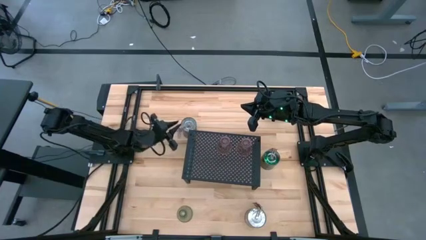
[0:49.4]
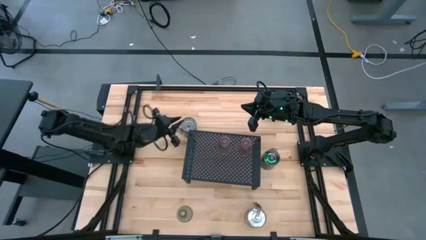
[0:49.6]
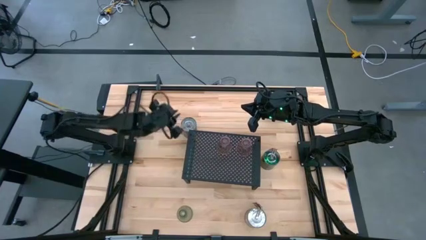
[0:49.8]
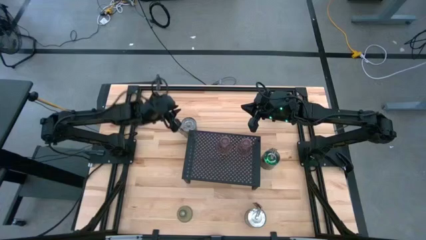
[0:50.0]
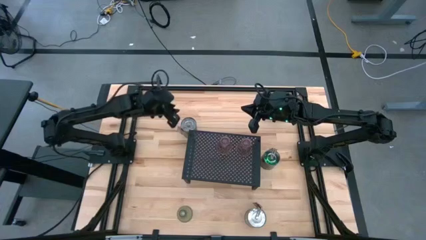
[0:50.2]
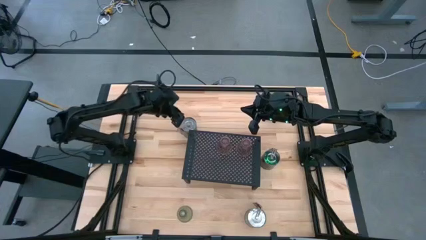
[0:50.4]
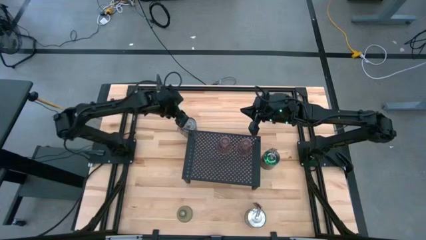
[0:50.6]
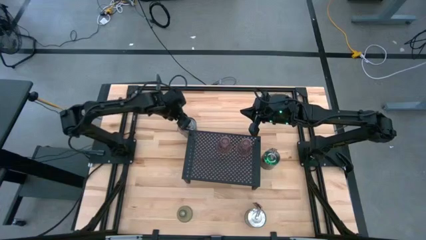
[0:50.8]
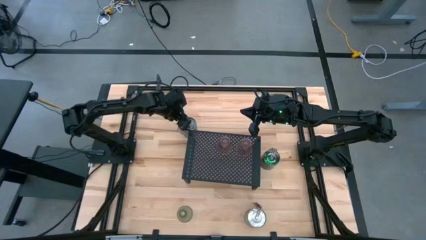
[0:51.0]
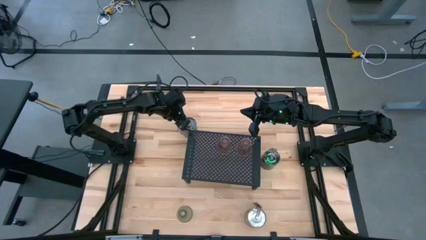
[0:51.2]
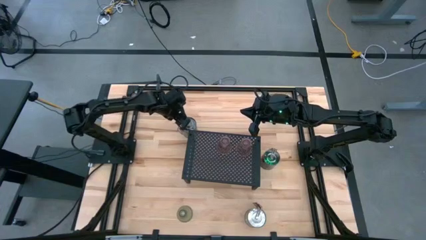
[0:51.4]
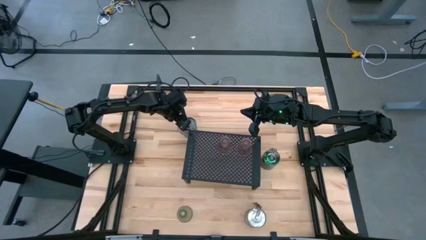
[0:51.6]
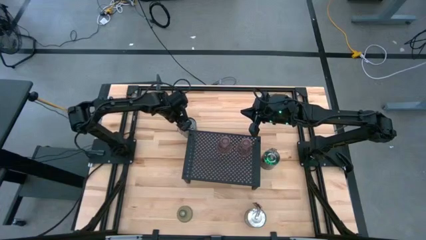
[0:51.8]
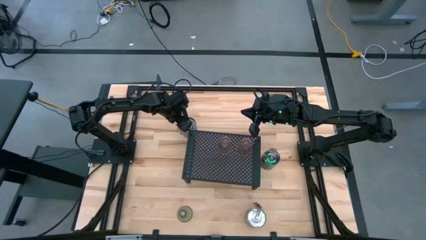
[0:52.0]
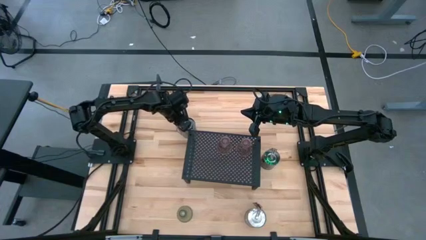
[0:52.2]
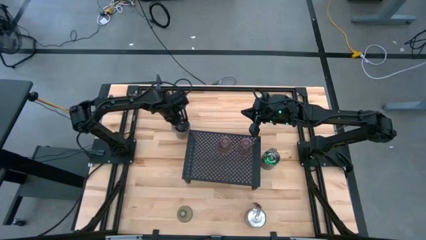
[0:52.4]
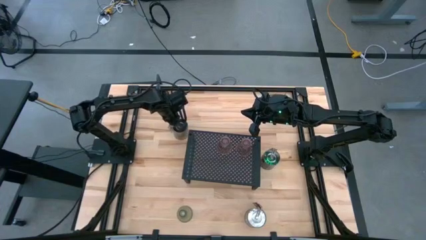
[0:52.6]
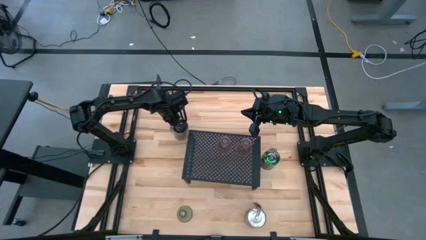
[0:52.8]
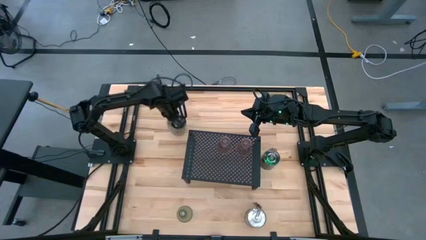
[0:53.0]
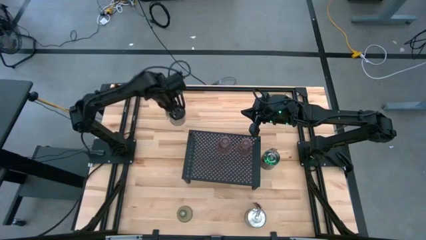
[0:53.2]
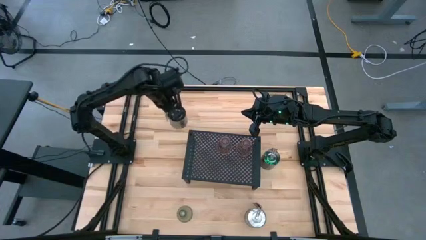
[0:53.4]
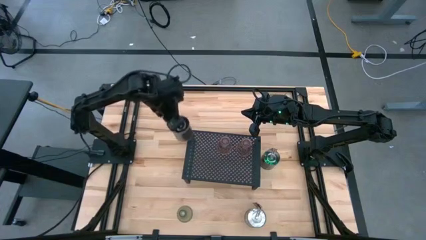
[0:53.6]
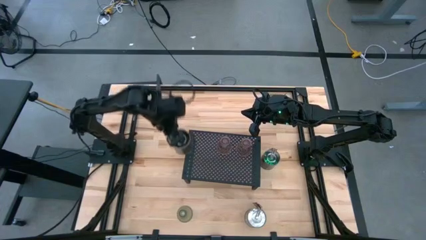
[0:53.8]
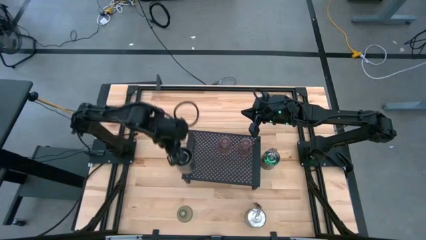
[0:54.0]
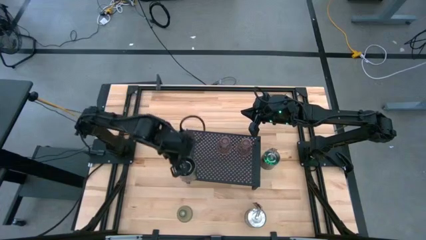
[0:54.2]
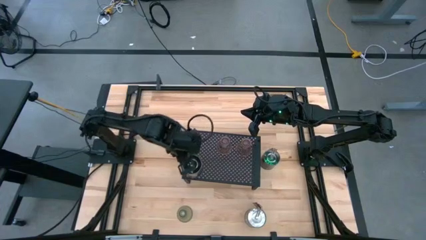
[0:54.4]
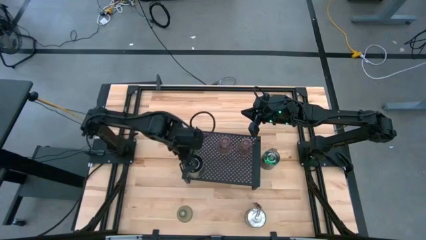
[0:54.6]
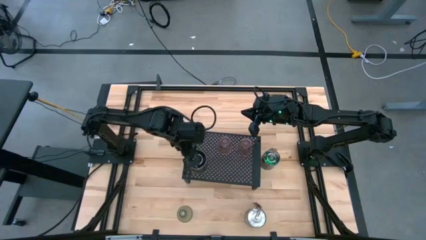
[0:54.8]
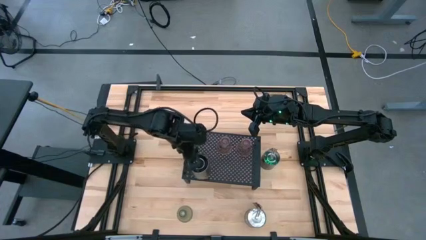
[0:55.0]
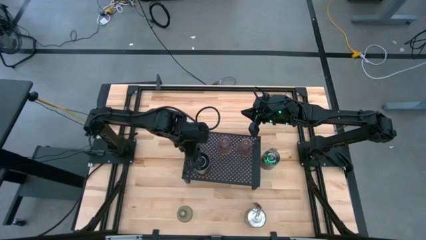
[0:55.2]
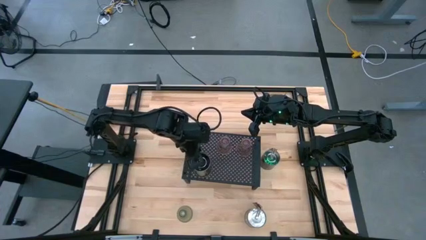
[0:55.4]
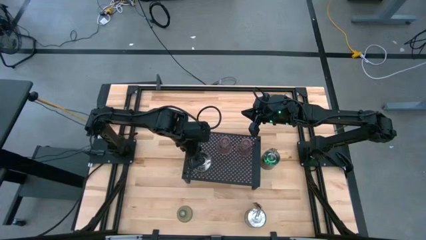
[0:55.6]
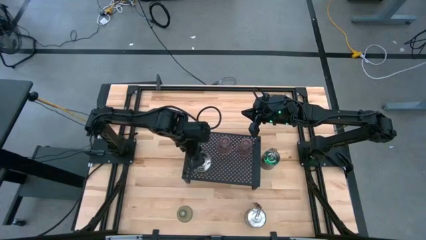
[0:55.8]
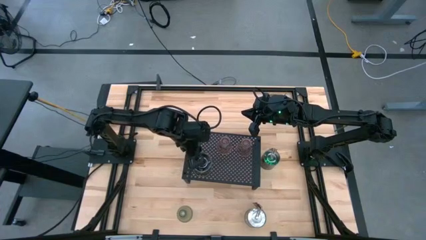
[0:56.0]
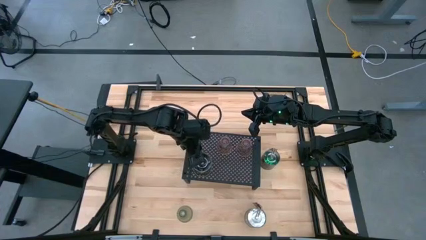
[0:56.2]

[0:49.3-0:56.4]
Task: Pick & Place candle stick holders
Put the top brown scented candle on the shelf

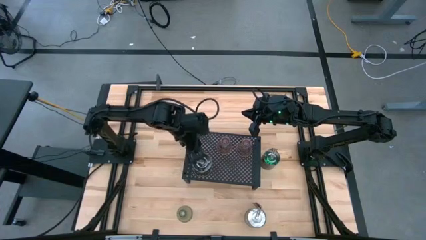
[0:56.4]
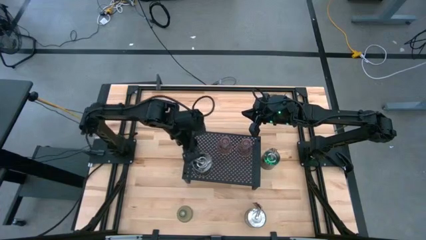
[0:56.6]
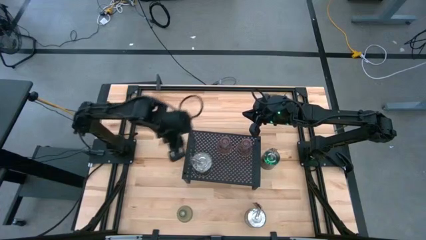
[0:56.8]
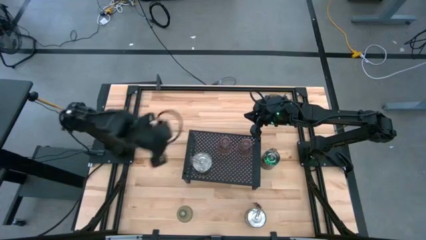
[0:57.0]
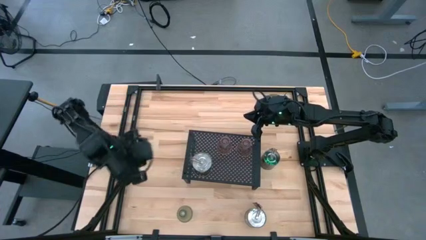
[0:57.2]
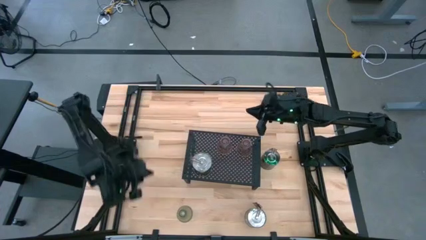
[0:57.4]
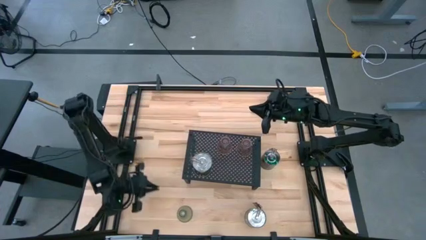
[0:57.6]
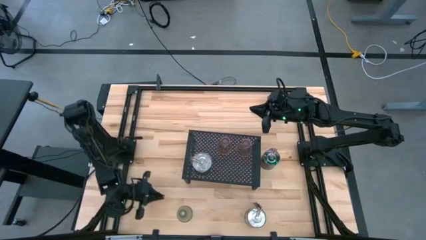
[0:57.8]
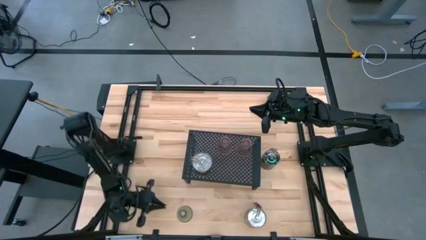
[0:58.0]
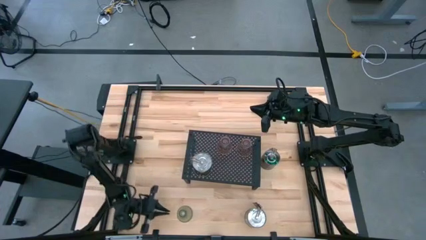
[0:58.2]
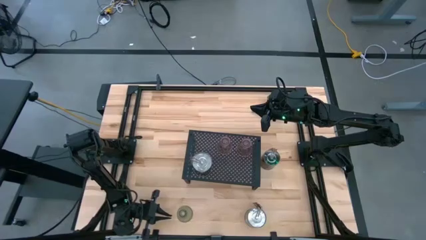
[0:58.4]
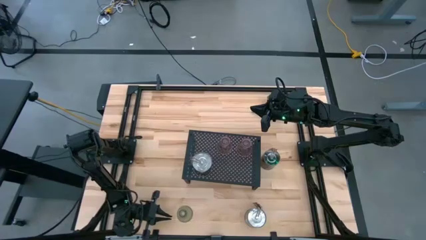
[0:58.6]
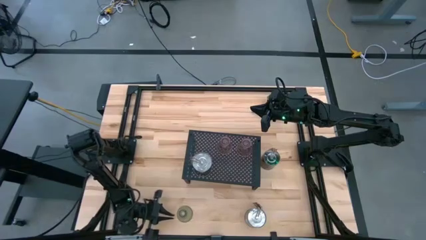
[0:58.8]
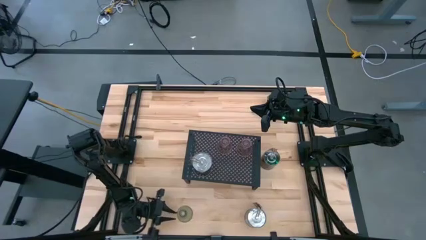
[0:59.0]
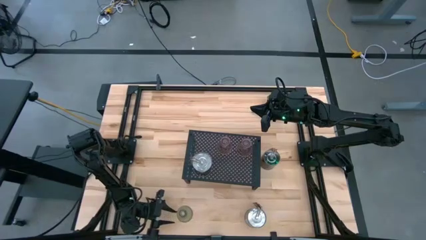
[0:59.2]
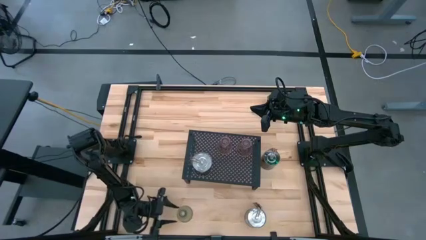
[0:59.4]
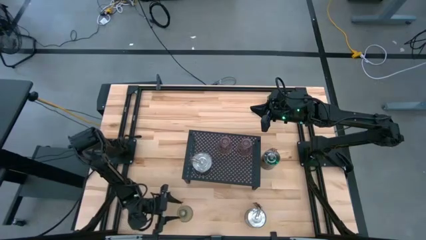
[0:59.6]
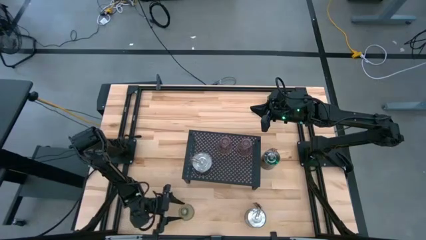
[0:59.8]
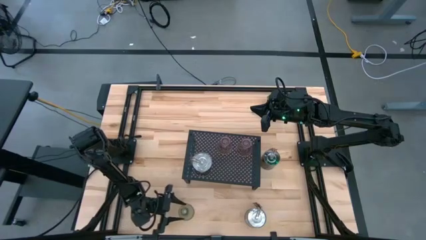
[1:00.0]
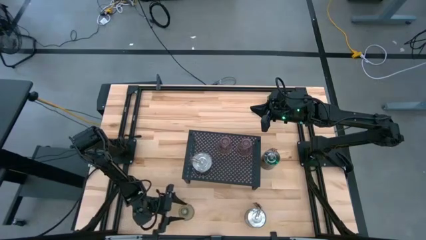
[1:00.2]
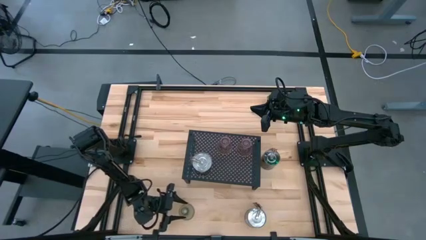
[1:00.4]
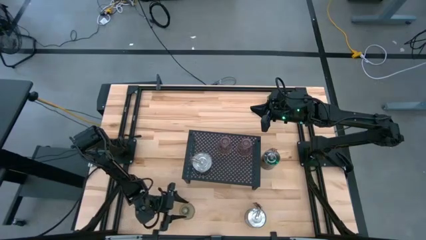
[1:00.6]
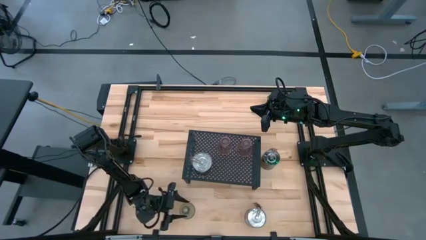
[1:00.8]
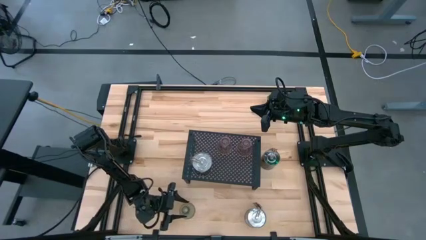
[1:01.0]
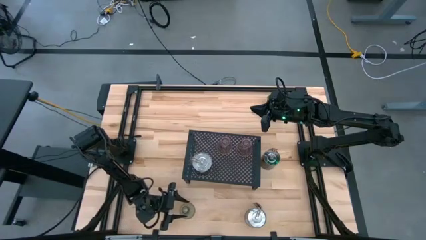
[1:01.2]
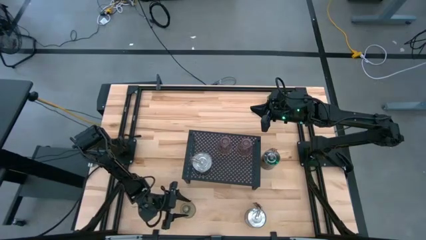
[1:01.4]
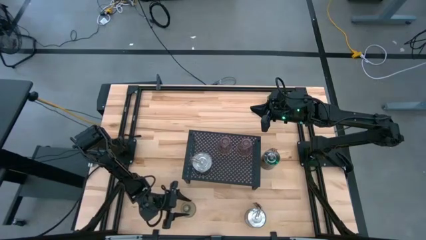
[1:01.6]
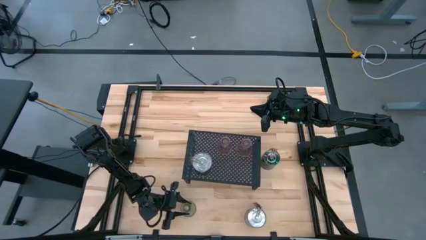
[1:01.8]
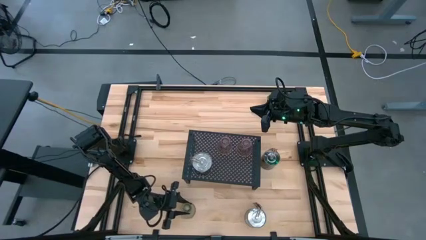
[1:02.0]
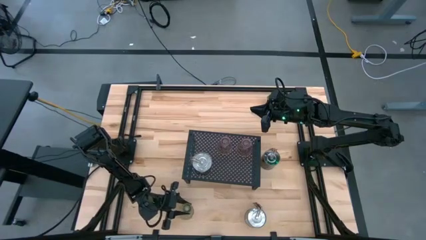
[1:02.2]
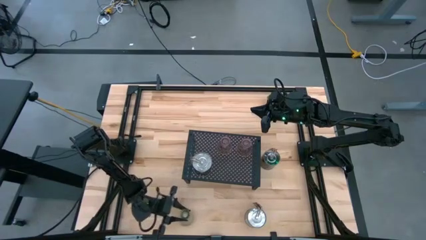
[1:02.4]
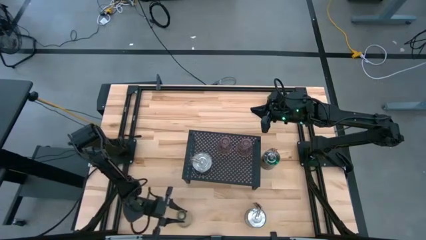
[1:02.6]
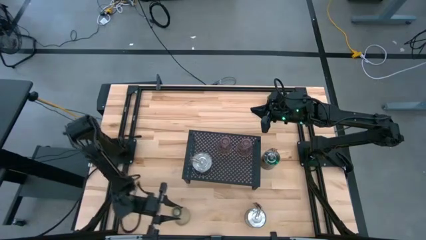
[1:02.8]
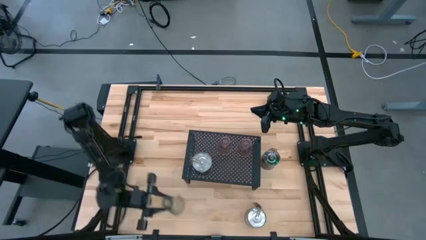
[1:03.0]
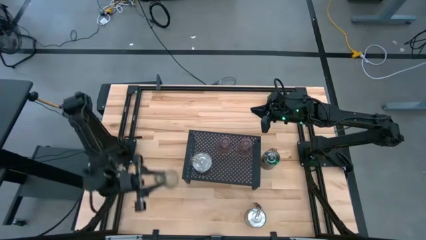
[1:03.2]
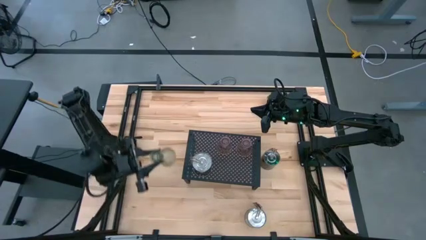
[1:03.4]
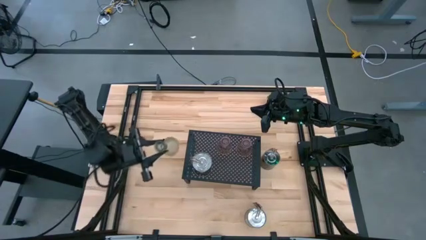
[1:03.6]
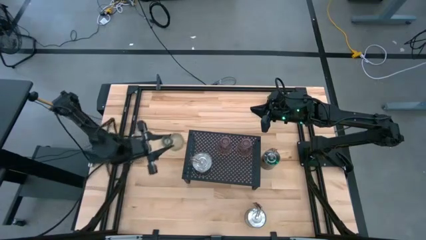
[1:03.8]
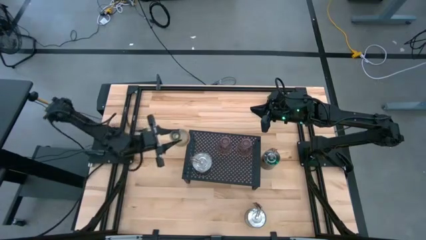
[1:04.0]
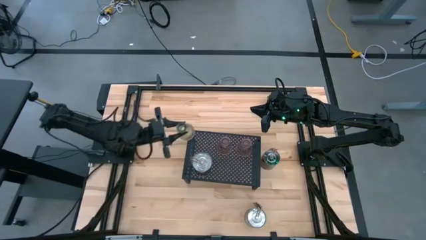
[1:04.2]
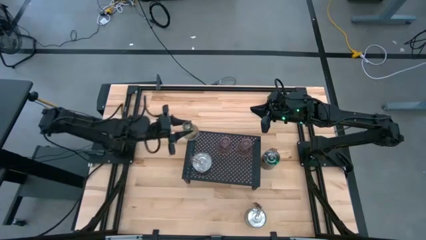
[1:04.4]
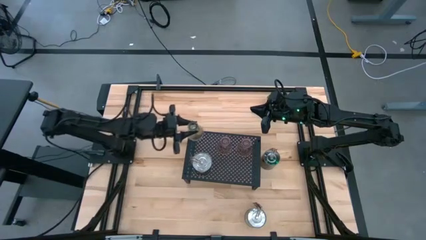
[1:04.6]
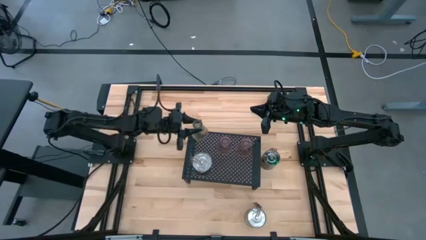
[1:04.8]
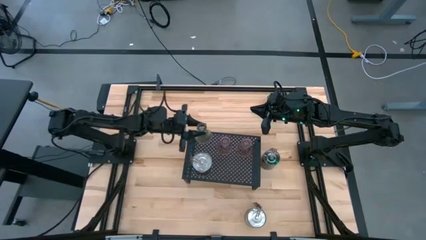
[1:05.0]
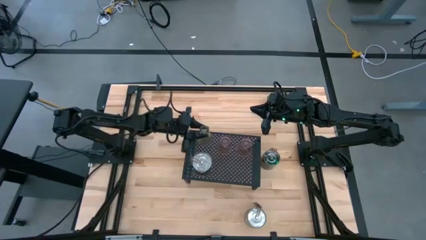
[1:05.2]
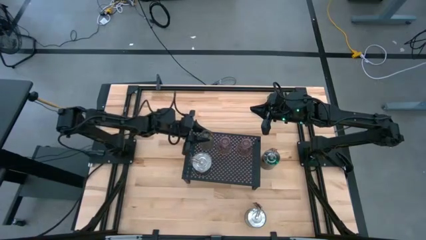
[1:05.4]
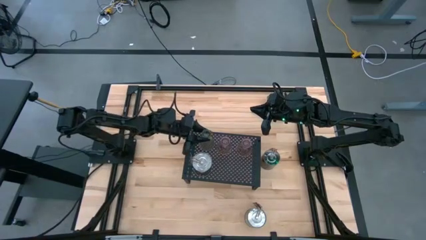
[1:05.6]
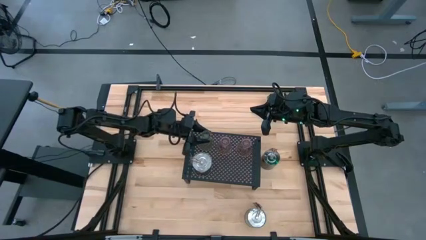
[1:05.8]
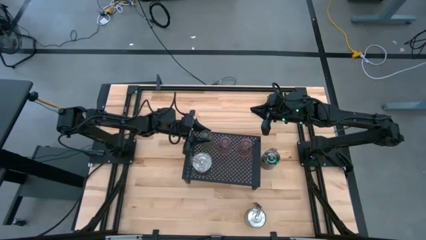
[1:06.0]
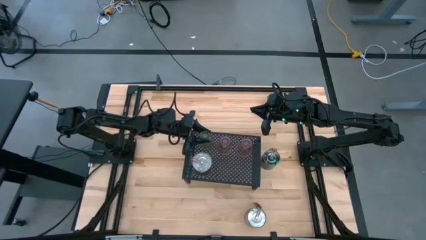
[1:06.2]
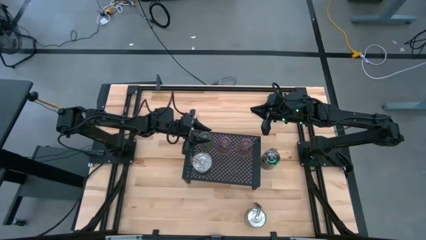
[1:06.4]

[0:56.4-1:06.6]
Put the transparent candle holder on the shelf
